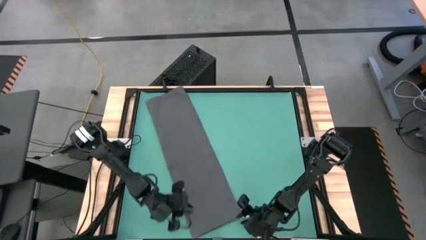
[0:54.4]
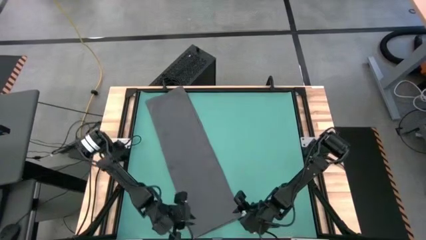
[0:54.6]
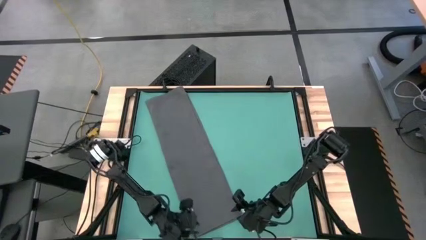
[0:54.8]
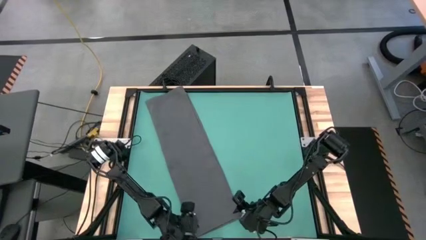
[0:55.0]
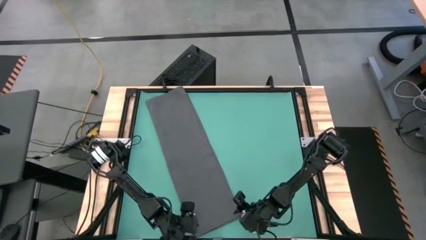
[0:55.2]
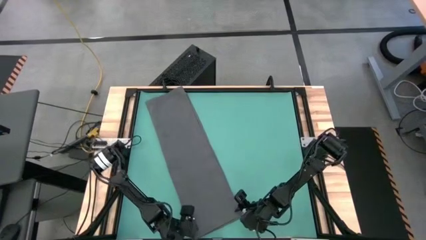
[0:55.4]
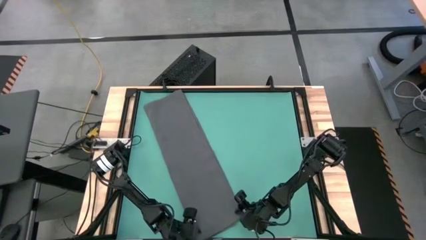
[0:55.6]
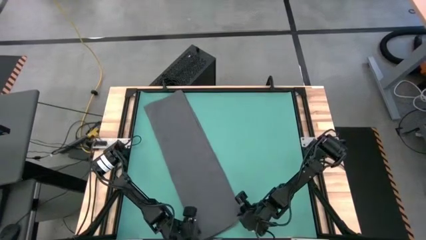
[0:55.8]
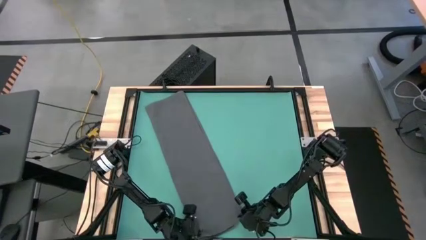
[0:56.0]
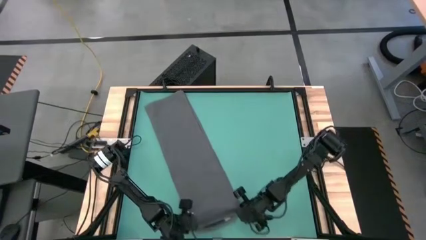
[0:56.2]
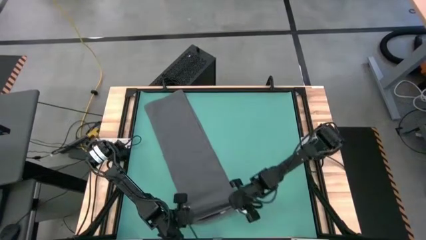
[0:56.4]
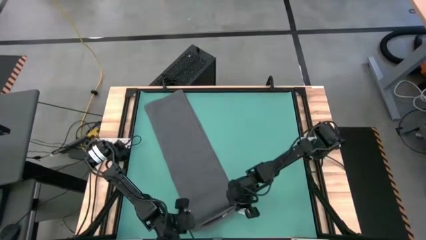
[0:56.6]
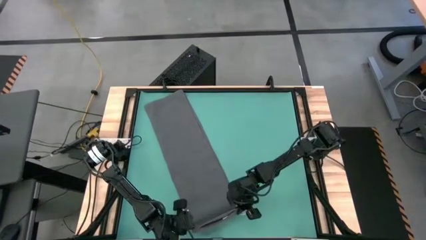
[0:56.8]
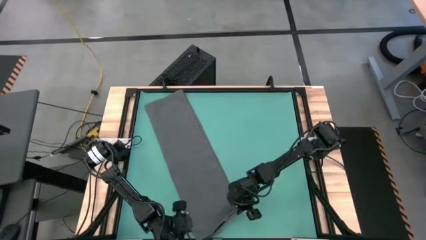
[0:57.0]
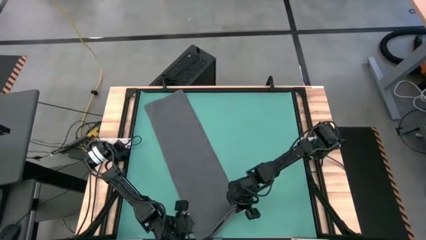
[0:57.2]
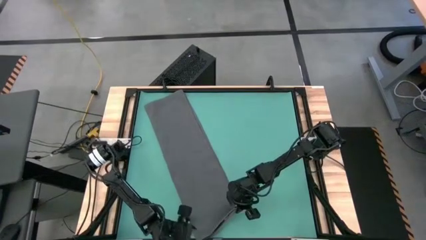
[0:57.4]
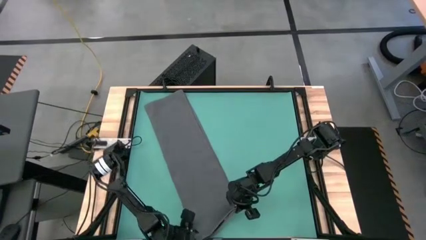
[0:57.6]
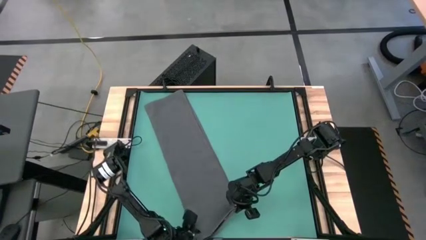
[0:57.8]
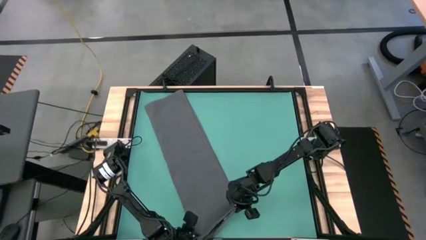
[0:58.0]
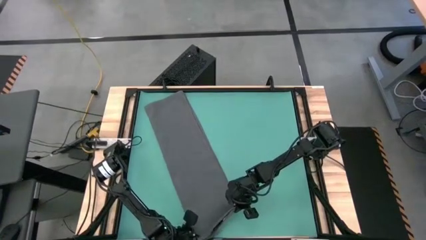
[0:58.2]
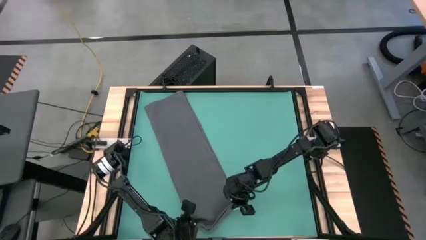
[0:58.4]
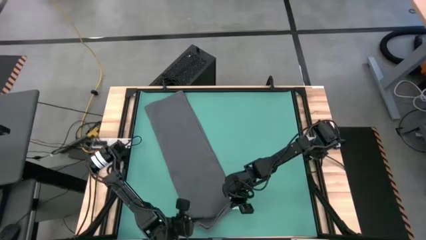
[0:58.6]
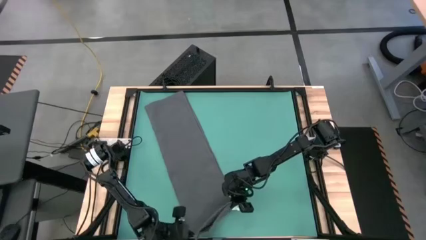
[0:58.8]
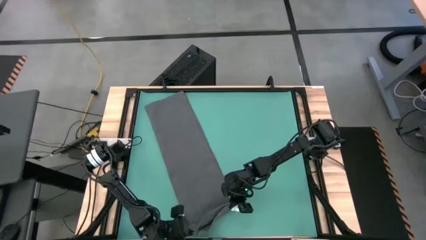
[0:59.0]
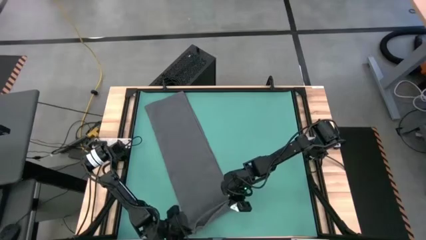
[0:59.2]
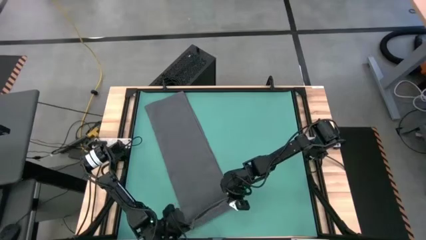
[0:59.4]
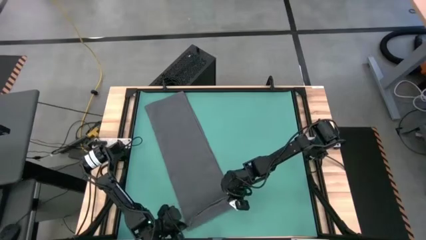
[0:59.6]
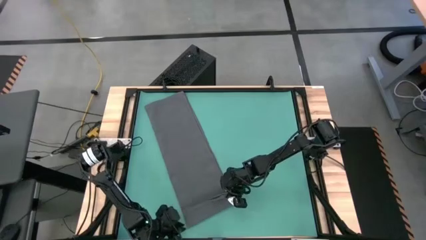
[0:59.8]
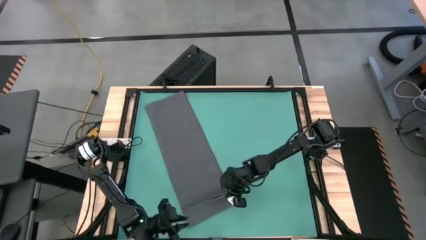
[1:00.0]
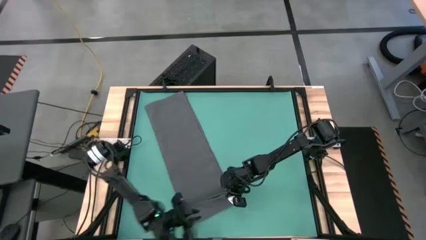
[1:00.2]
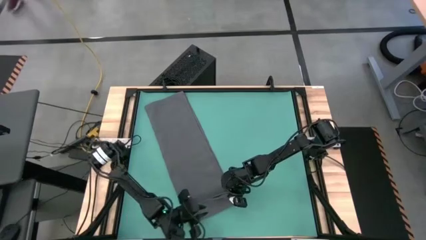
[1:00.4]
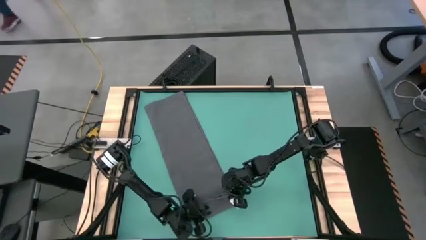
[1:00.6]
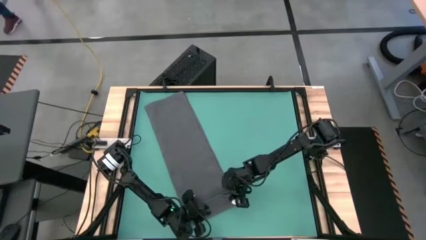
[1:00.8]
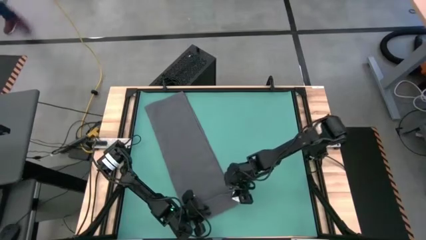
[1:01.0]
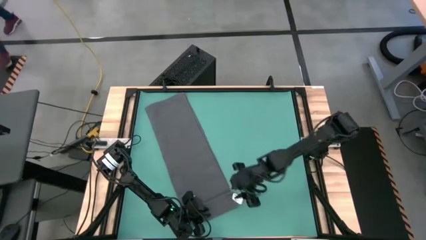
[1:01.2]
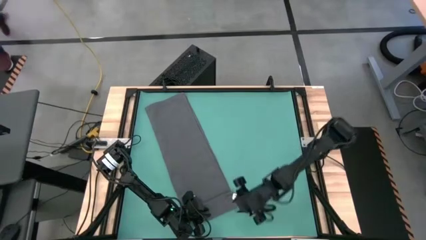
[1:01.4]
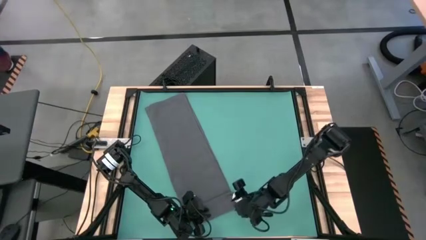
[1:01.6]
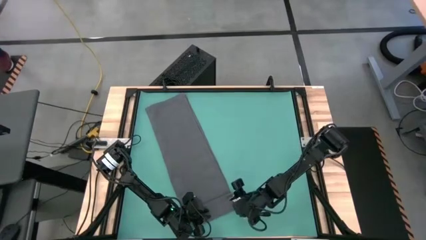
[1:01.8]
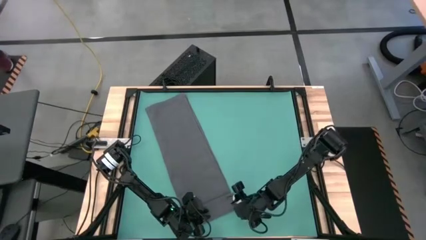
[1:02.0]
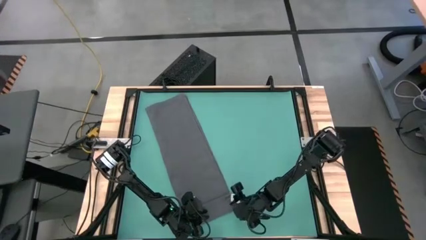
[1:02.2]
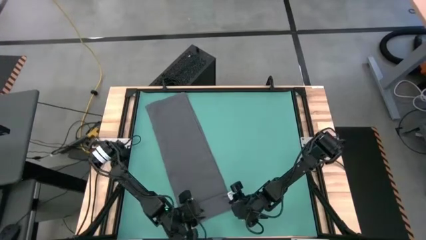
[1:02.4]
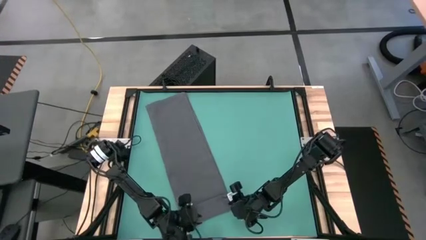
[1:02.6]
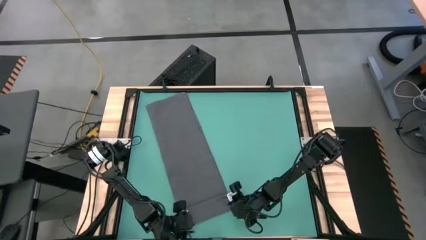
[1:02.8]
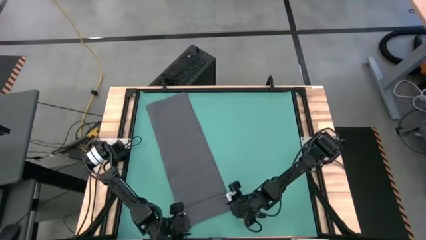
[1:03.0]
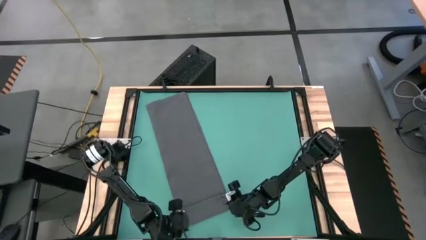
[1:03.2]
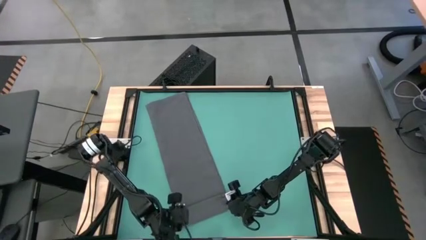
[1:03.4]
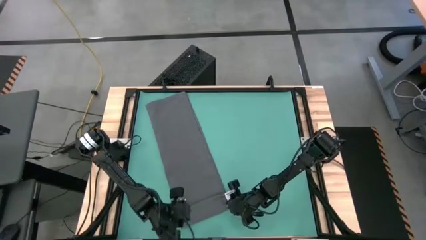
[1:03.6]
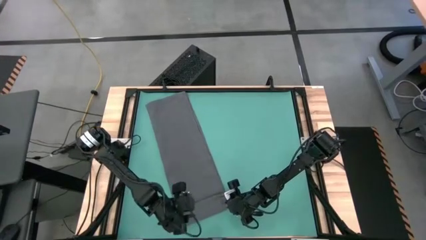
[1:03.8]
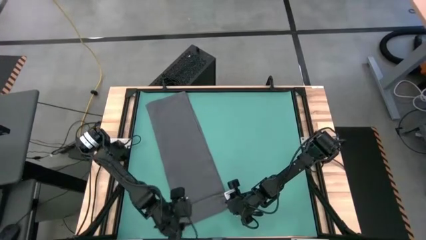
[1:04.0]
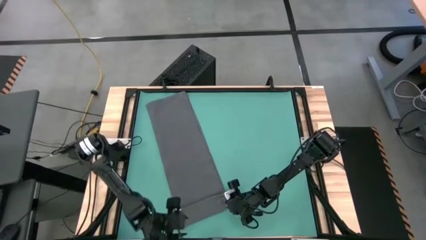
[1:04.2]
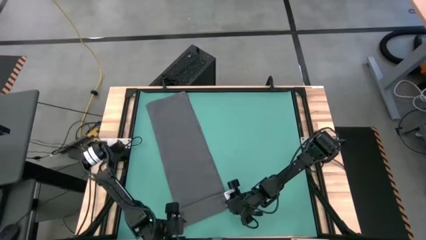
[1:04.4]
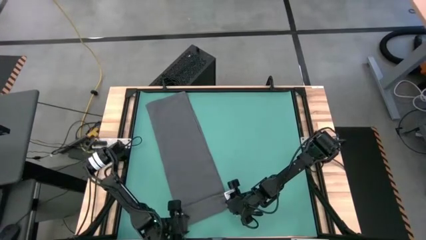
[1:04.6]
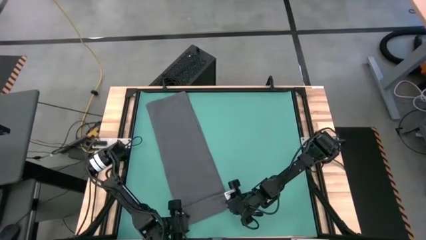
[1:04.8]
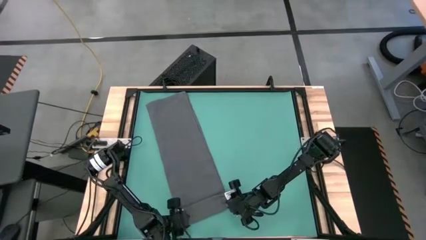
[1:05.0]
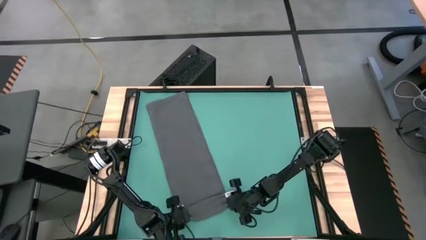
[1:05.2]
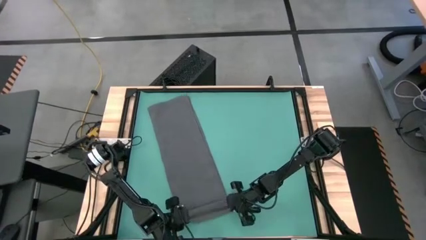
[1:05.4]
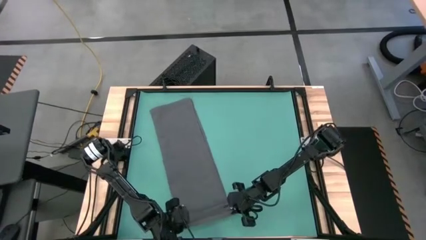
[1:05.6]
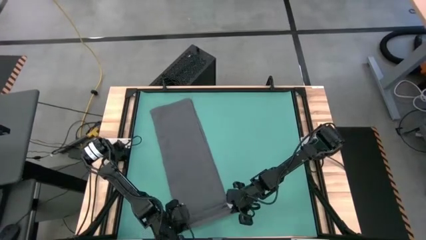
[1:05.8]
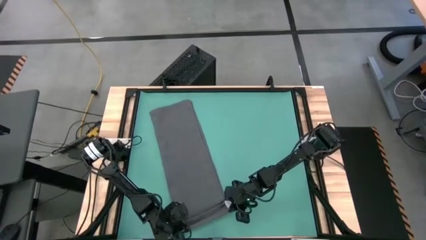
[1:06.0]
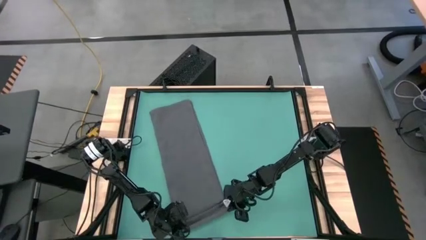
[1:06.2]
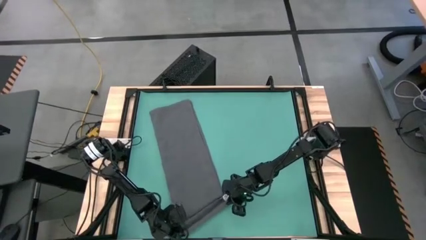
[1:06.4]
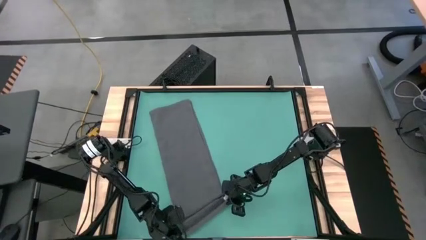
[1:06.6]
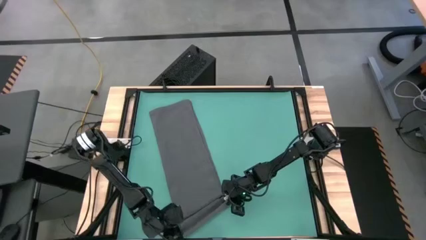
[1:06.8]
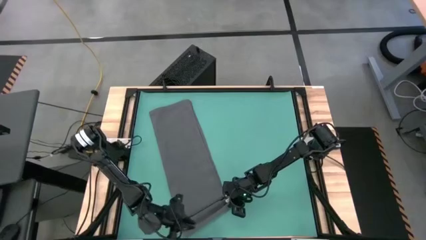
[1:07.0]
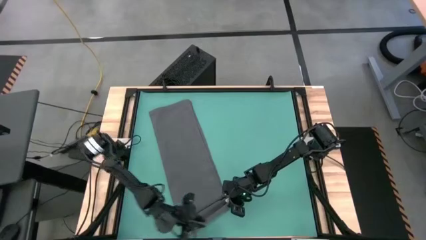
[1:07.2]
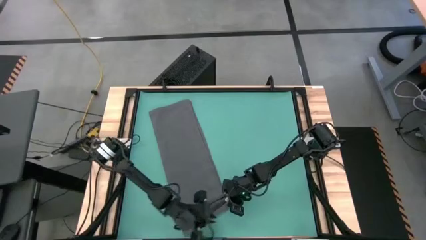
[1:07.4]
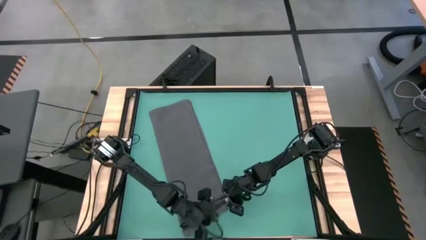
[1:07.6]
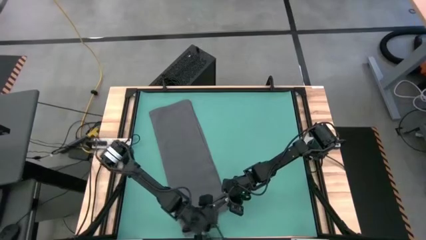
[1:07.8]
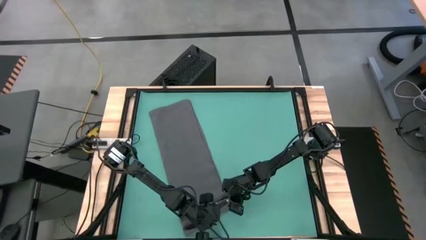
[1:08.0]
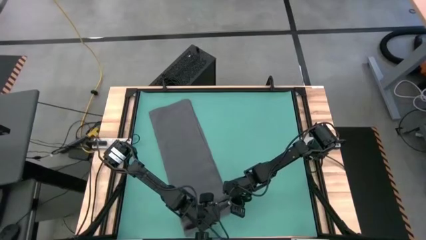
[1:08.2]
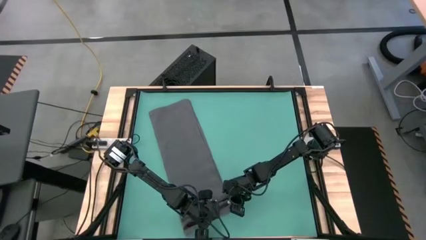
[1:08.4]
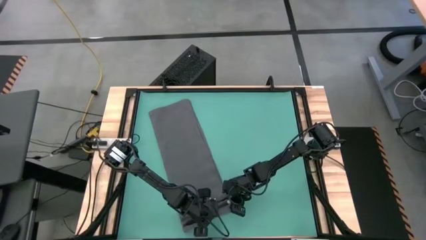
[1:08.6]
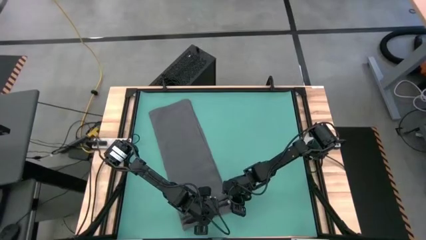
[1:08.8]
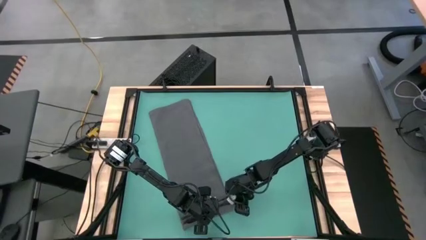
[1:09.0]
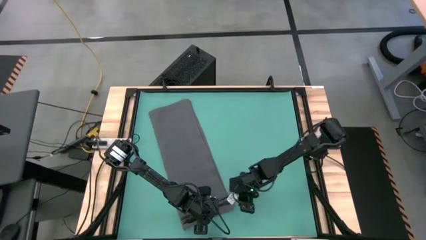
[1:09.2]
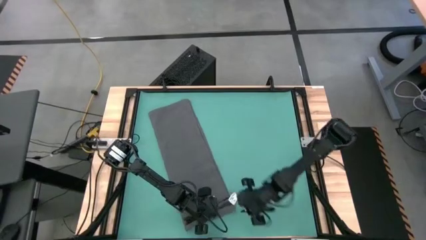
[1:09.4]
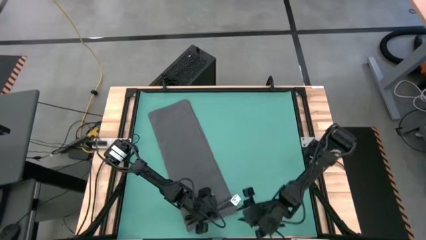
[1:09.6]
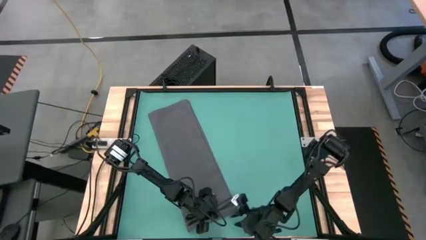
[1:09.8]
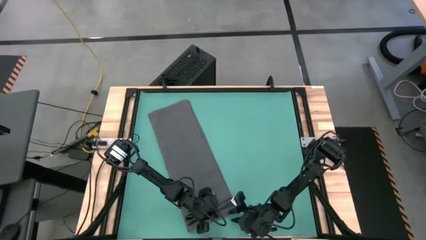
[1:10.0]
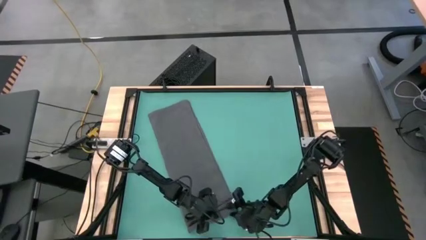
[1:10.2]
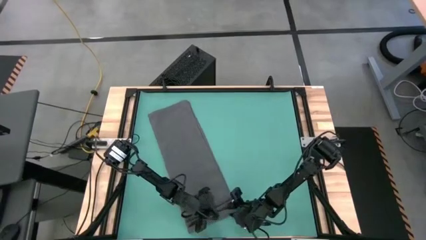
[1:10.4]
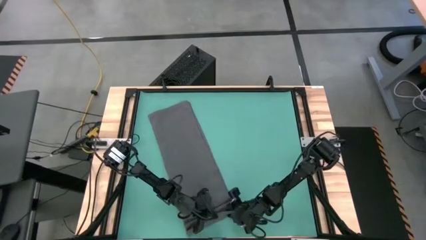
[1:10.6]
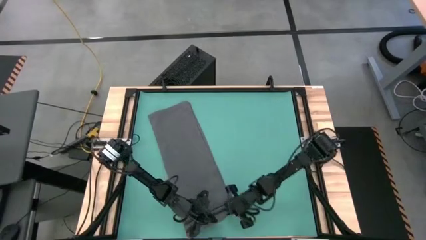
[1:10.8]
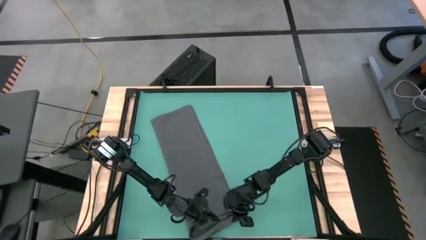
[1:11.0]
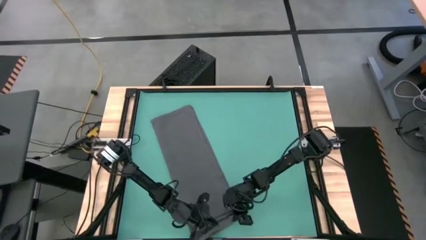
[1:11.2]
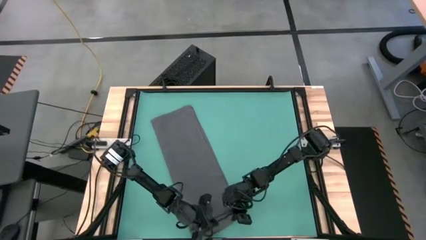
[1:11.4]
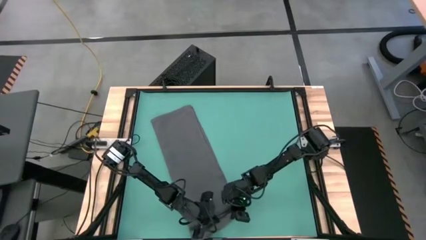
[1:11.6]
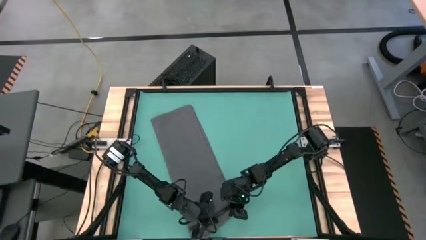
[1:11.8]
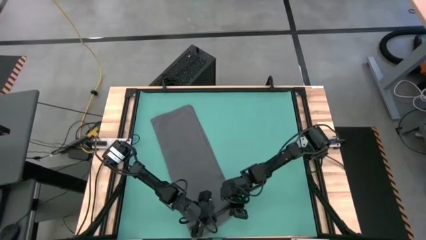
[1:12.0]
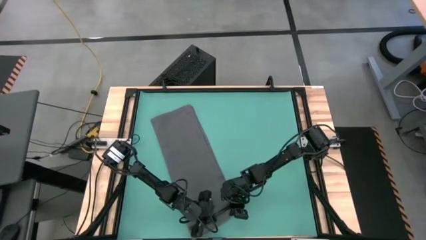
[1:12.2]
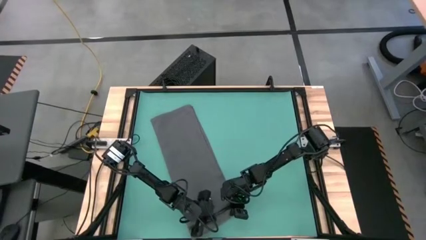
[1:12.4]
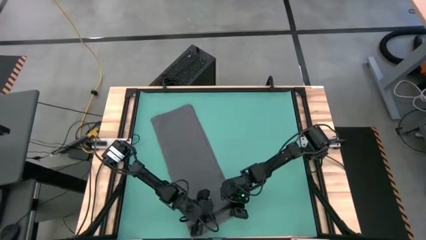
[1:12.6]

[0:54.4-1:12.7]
Task: Roll towel into tight, uniform cylinder
Roll the gray towel
